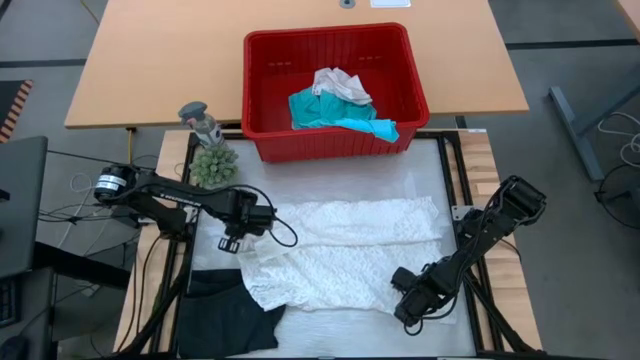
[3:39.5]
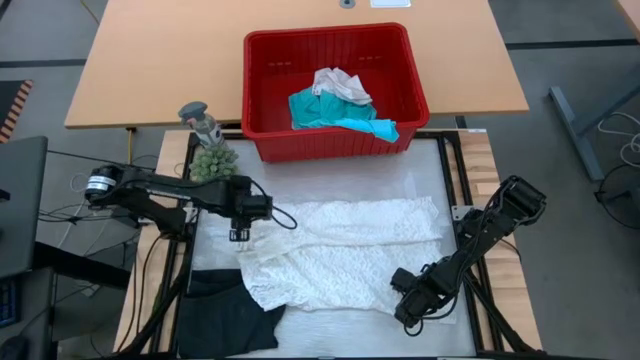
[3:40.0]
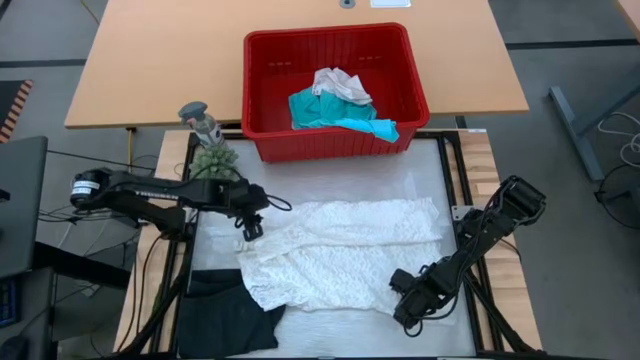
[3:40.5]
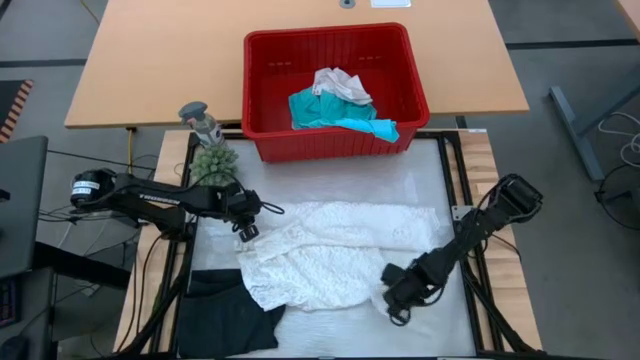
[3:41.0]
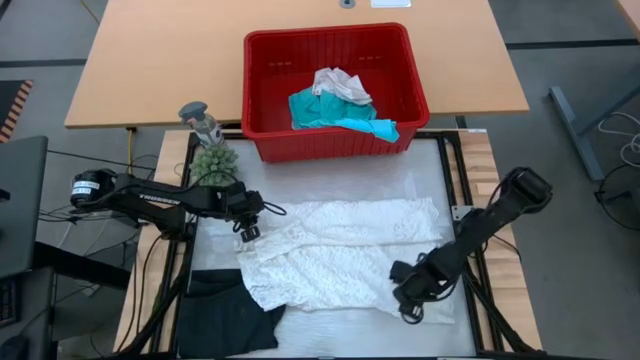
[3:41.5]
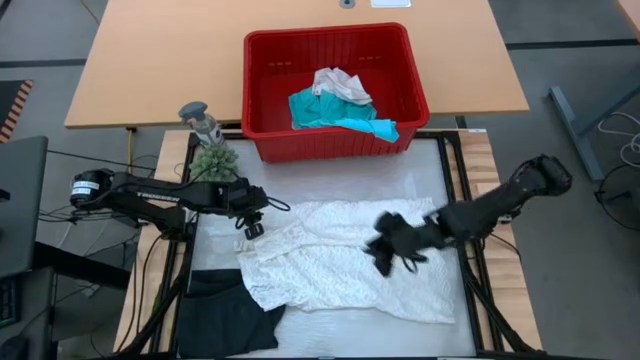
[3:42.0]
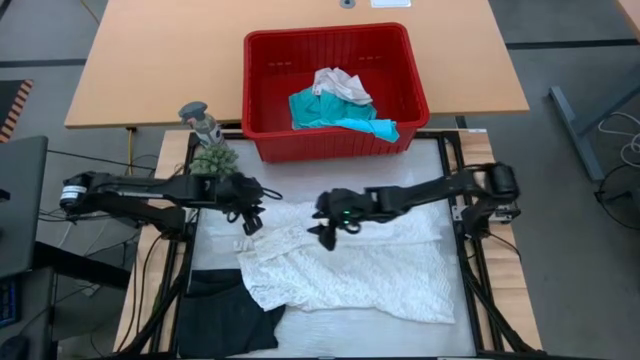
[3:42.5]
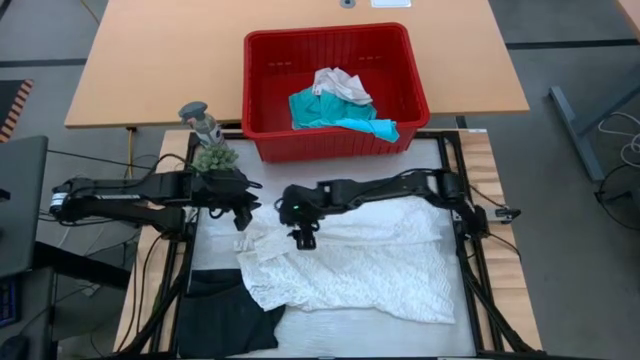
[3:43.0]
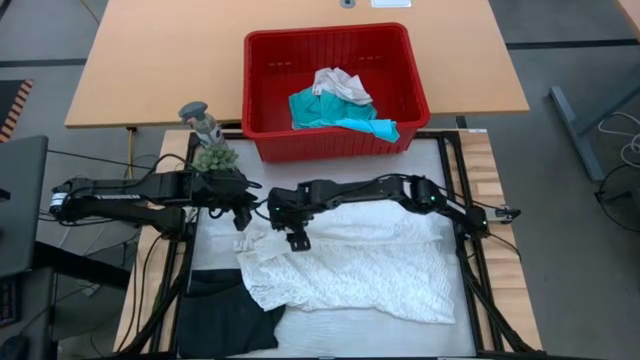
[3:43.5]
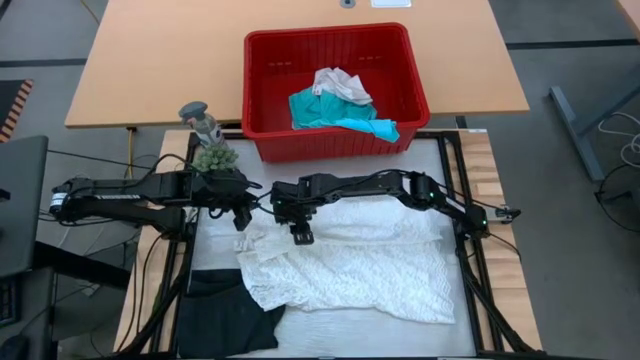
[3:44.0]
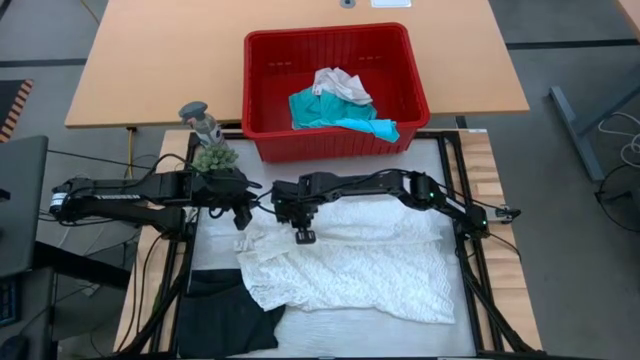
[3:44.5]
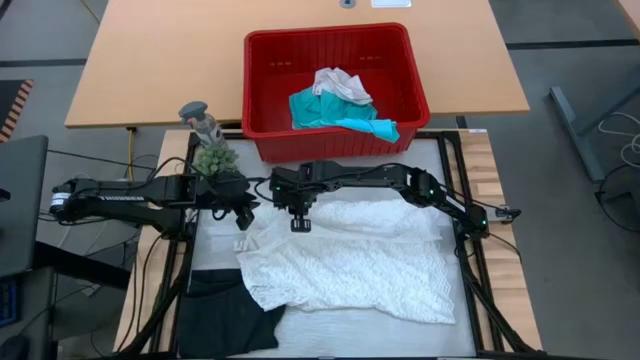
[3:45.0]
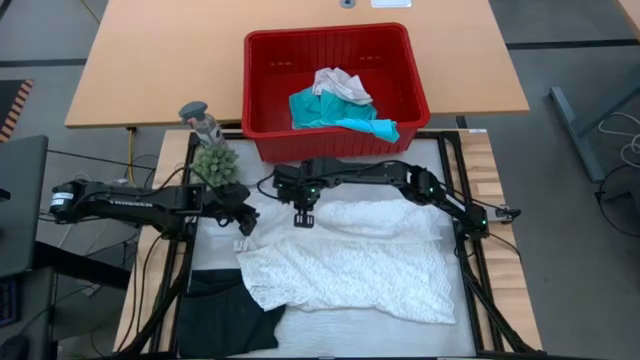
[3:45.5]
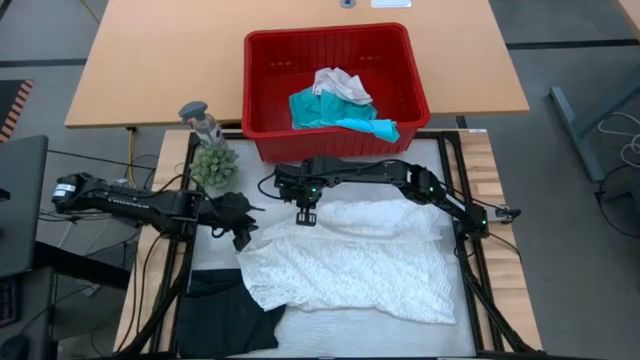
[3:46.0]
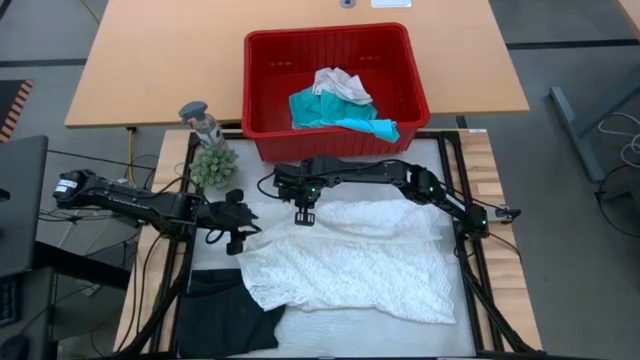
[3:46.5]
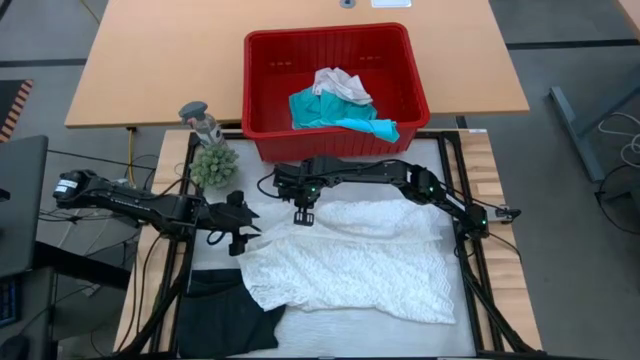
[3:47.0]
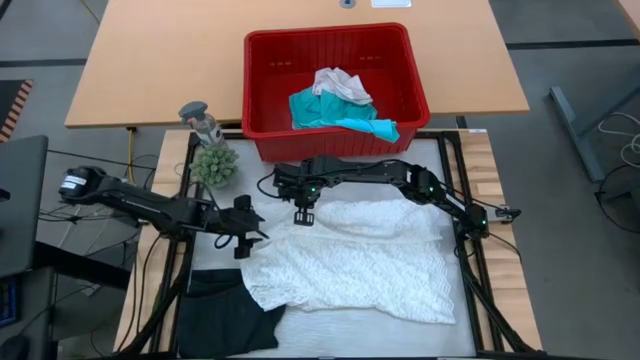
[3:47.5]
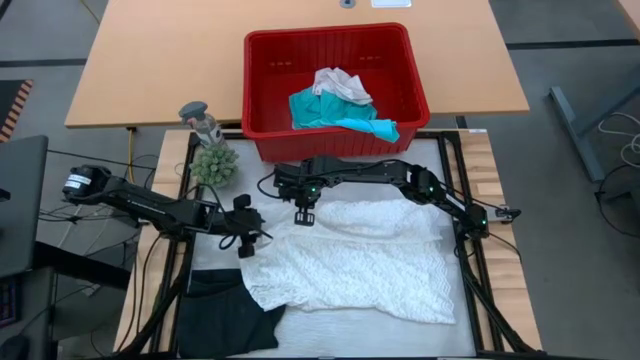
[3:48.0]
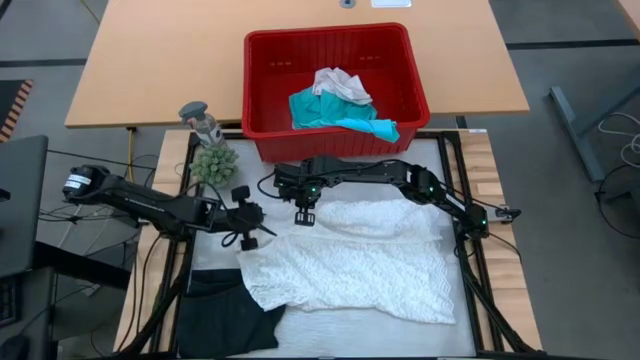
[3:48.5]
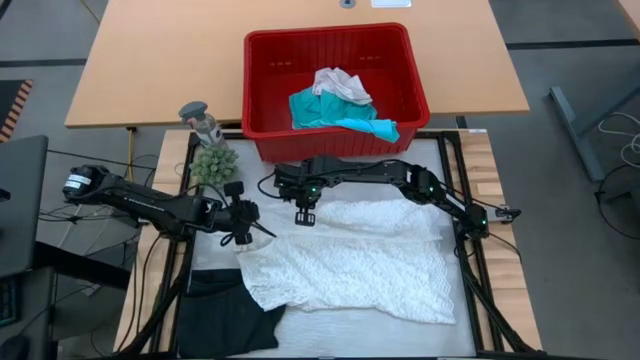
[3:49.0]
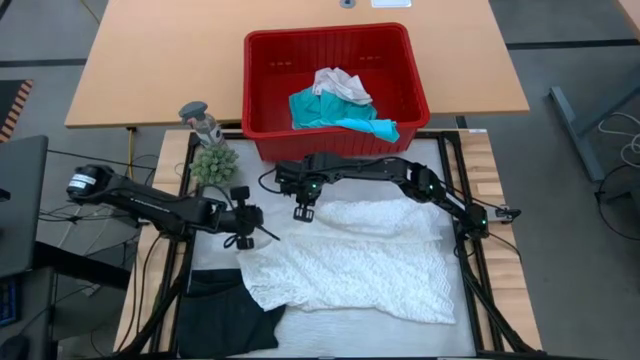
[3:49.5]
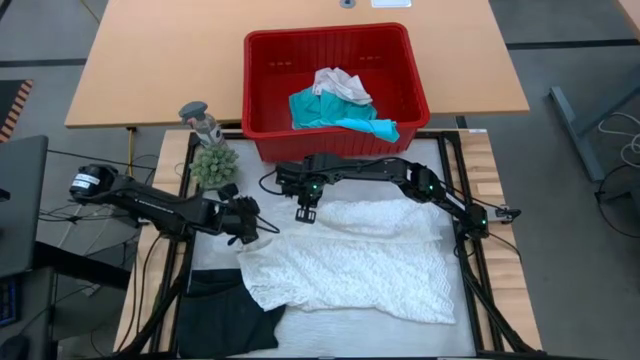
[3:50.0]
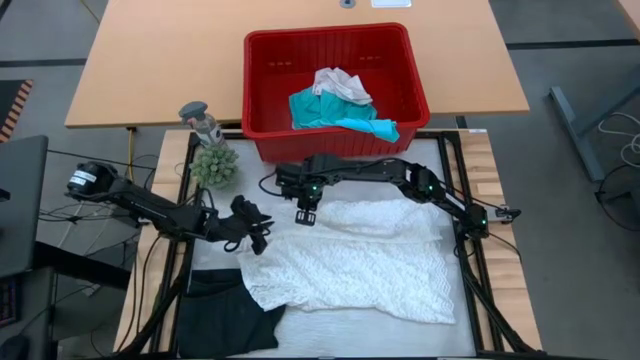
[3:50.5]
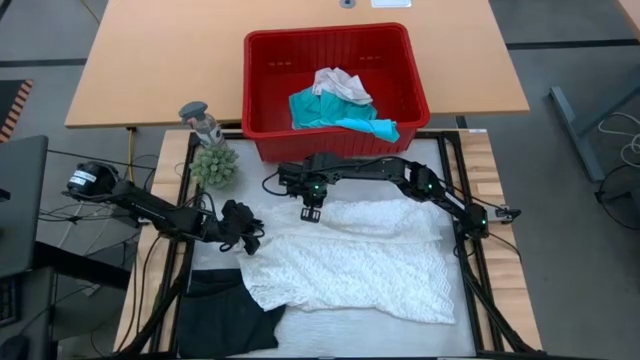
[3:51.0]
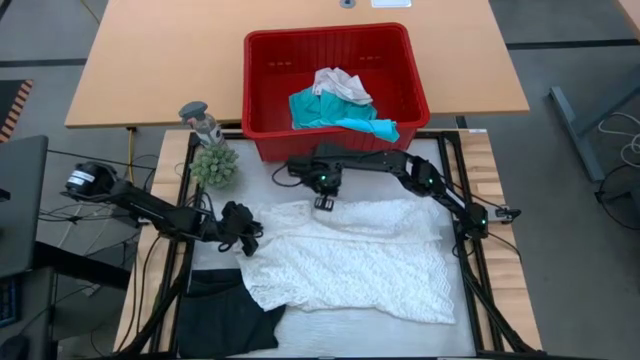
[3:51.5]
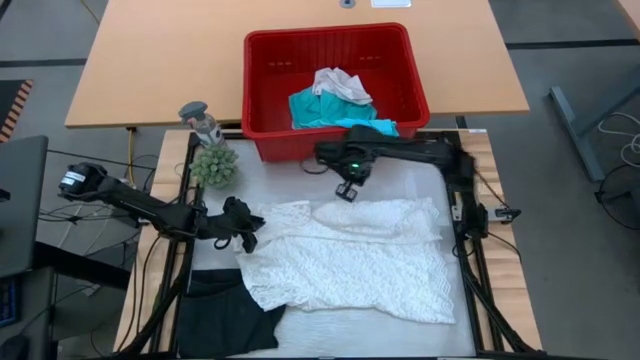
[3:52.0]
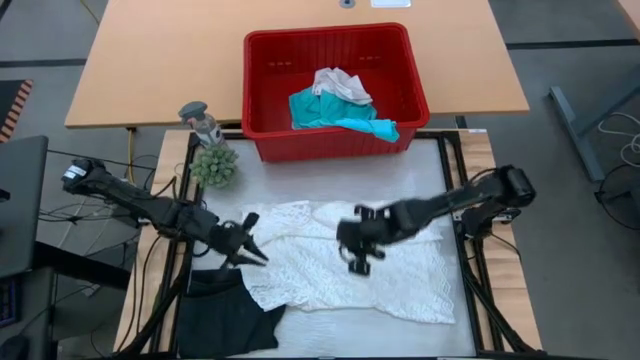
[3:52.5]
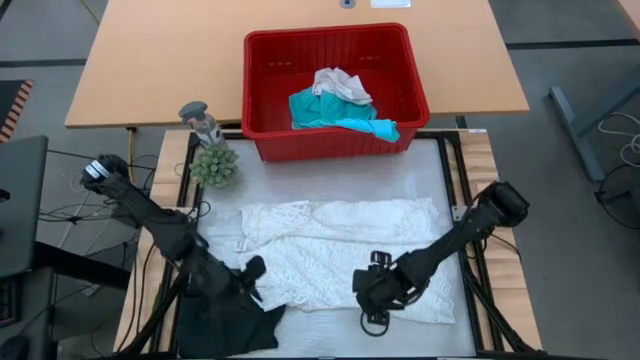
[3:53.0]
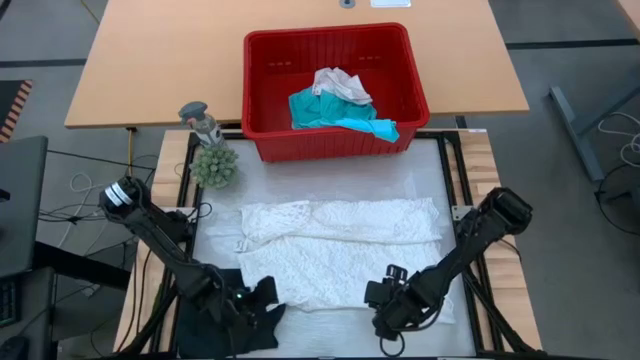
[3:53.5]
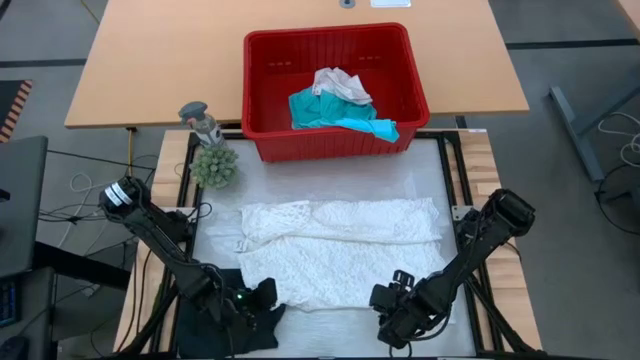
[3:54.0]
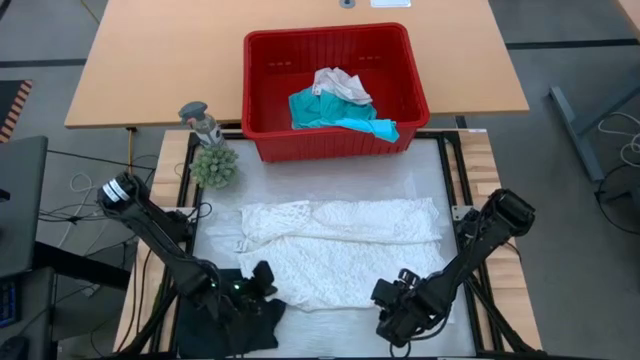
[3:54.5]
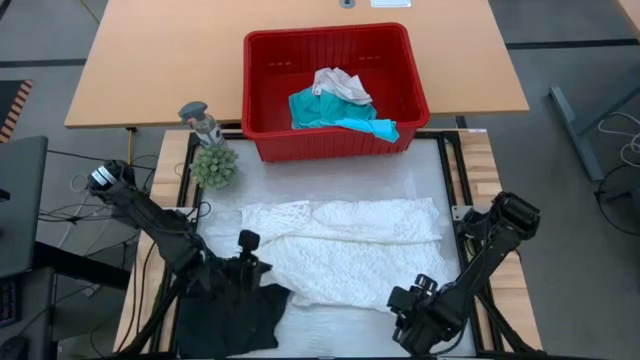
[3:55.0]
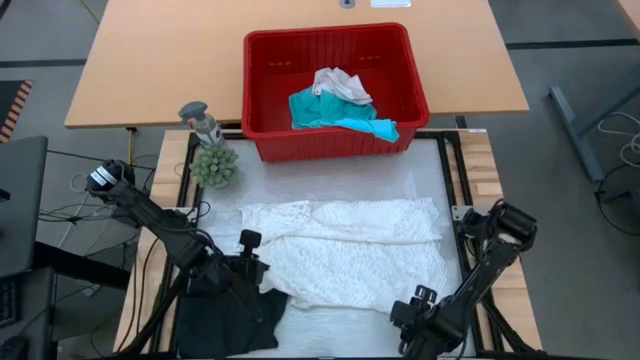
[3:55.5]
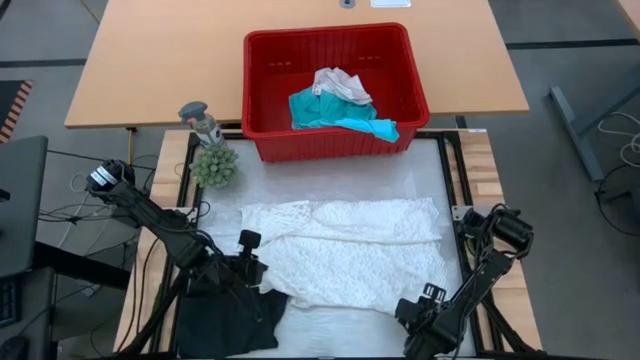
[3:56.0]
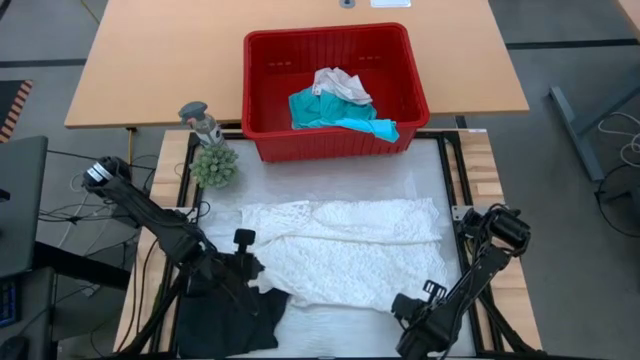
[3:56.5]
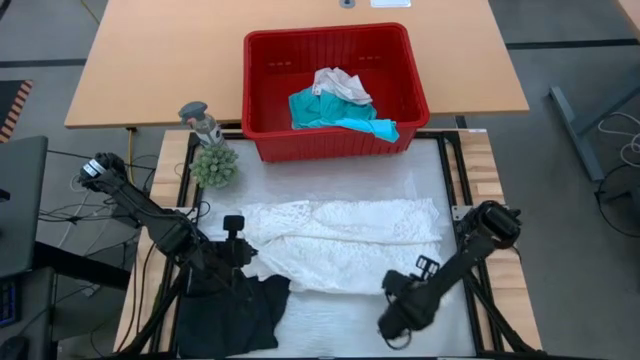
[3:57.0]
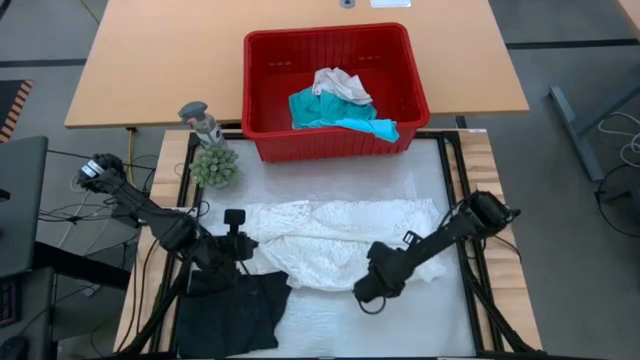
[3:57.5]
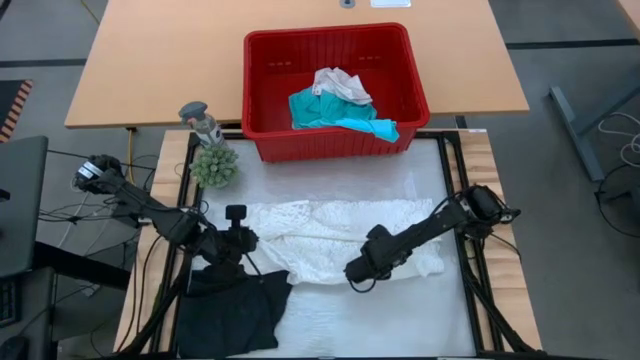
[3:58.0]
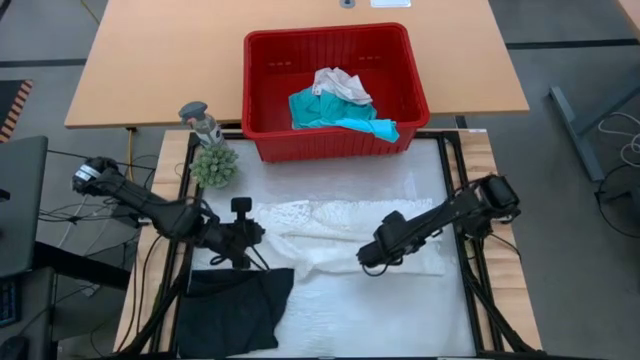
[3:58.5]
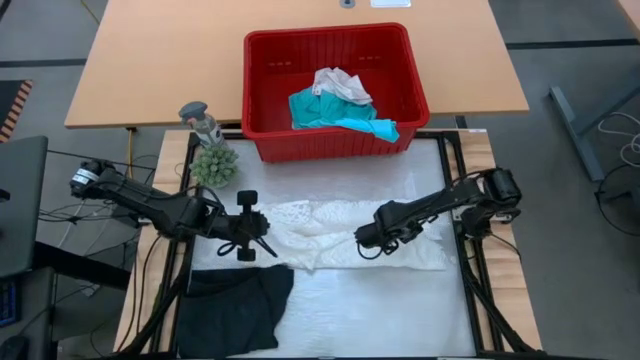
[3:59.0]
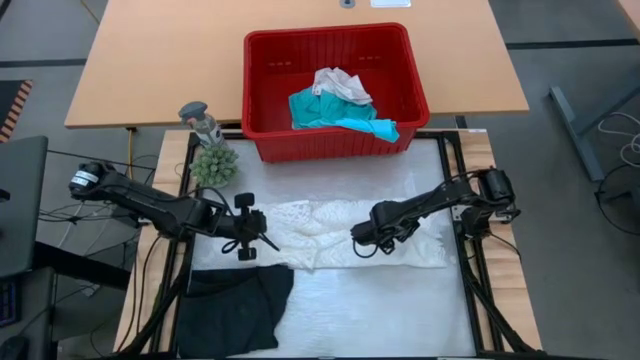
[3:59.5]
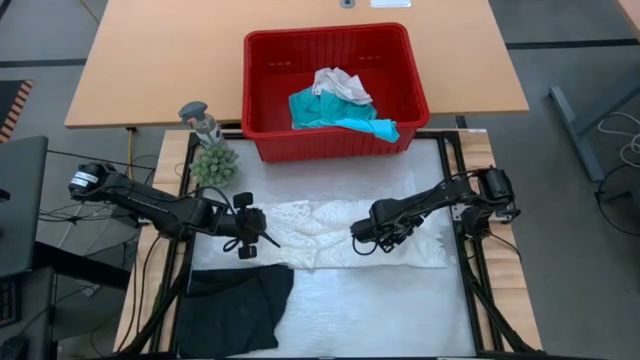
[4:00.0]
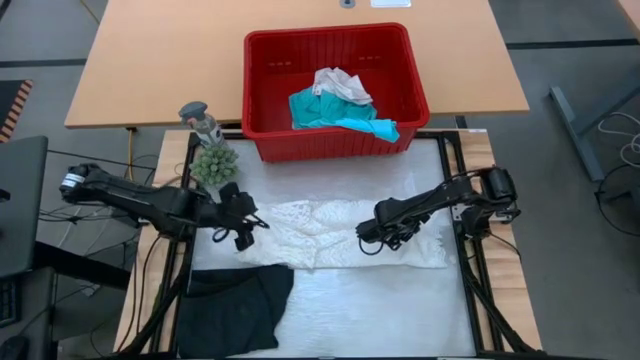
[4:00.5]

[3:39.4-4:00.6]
Task: Fold Laundry from Bin
Fold the white dress
